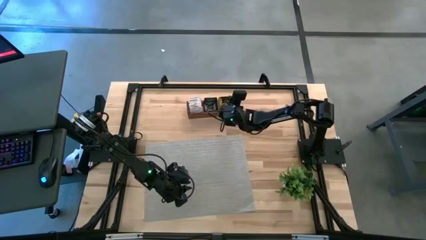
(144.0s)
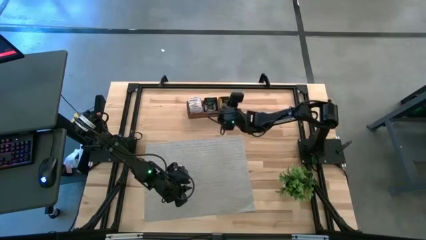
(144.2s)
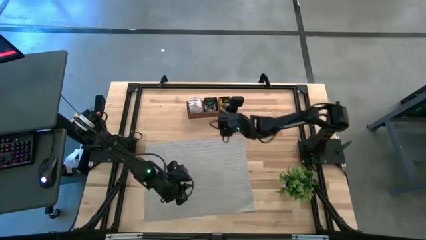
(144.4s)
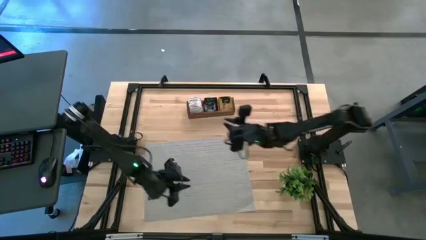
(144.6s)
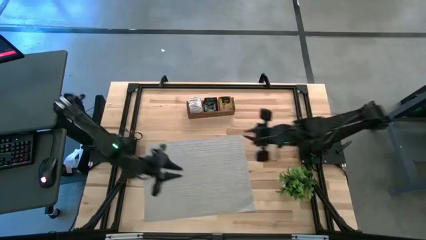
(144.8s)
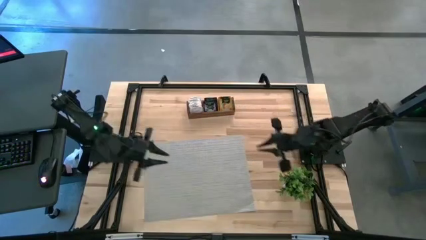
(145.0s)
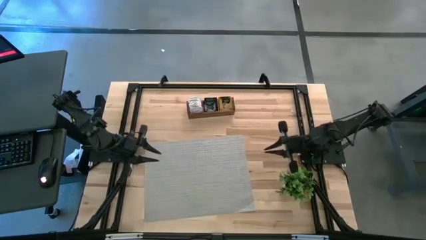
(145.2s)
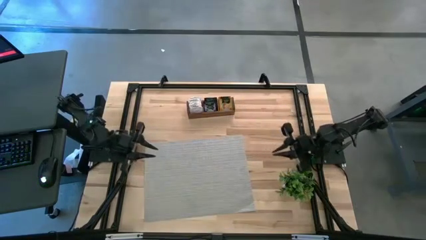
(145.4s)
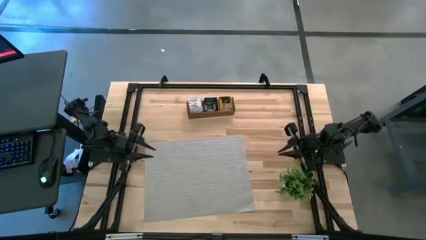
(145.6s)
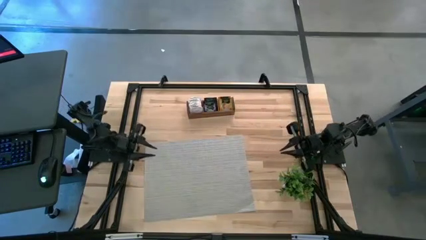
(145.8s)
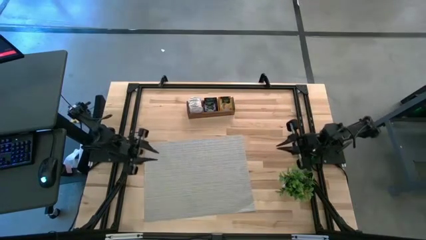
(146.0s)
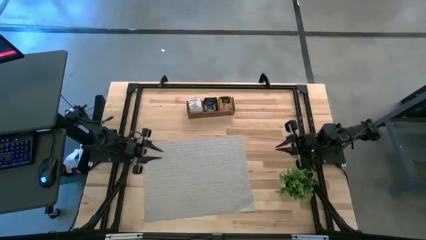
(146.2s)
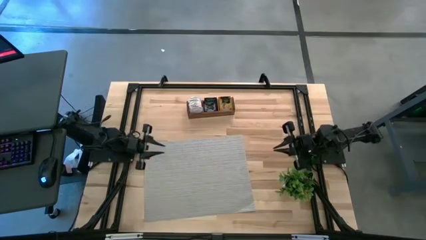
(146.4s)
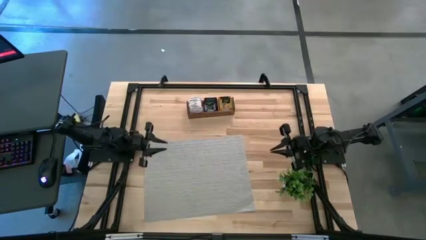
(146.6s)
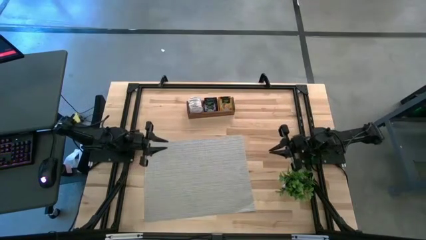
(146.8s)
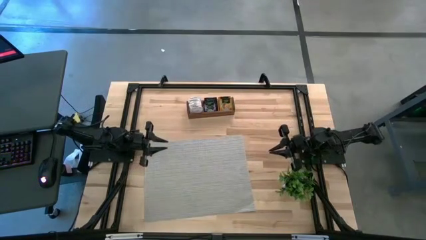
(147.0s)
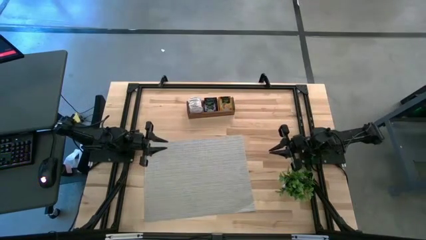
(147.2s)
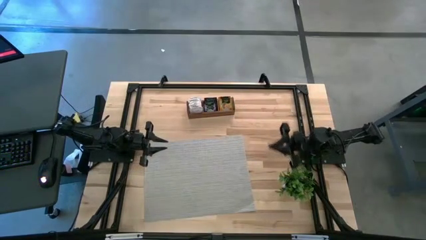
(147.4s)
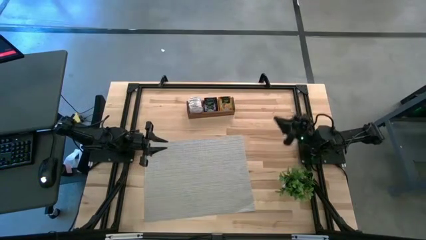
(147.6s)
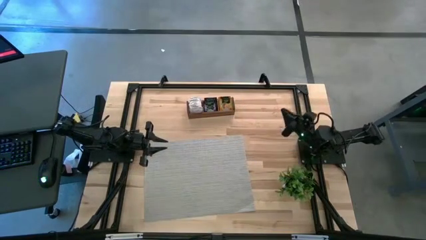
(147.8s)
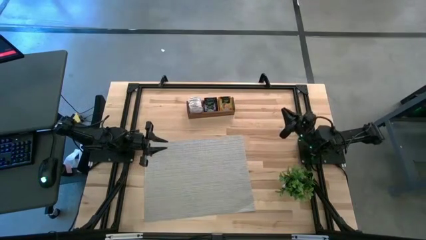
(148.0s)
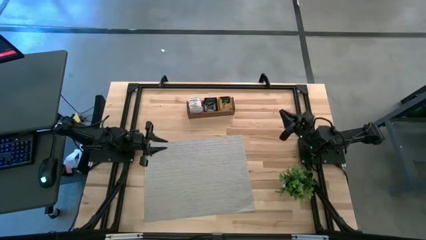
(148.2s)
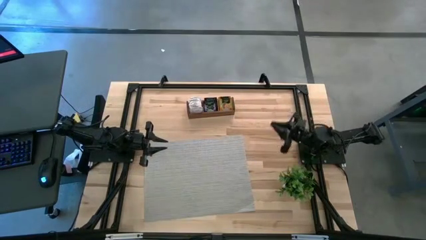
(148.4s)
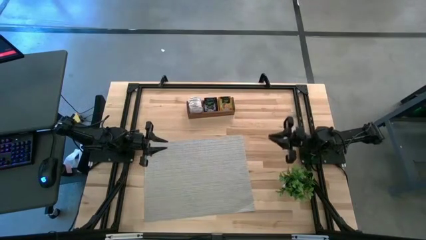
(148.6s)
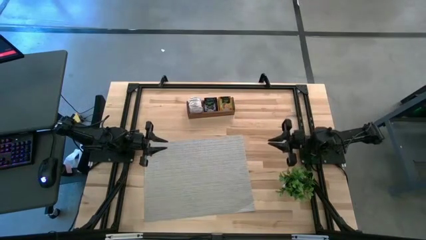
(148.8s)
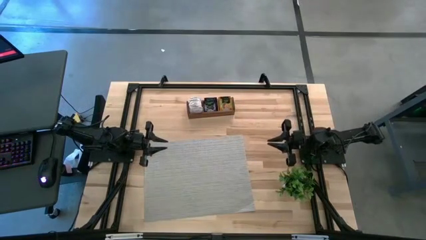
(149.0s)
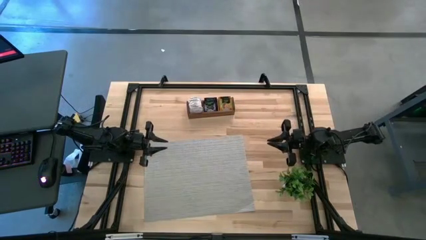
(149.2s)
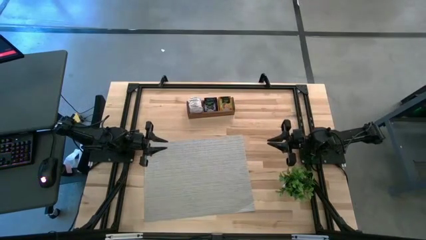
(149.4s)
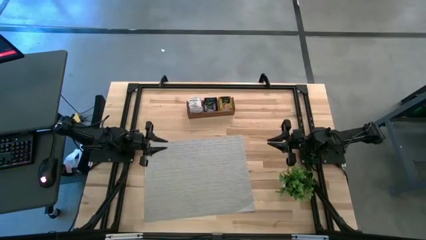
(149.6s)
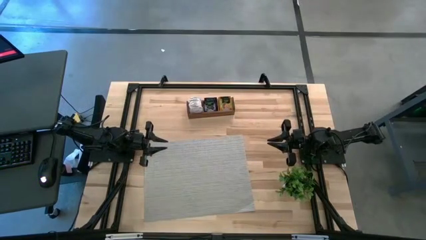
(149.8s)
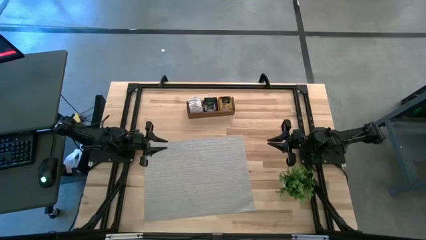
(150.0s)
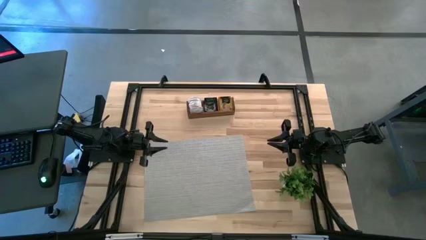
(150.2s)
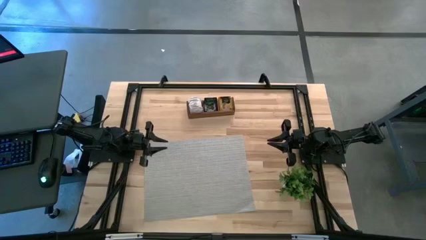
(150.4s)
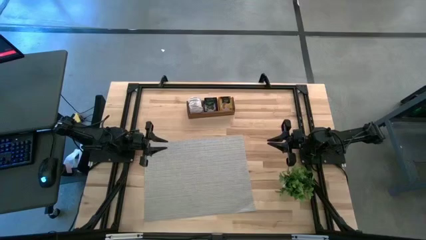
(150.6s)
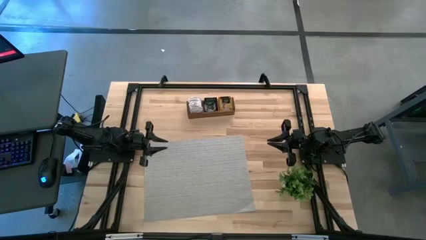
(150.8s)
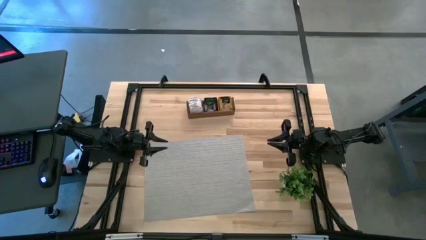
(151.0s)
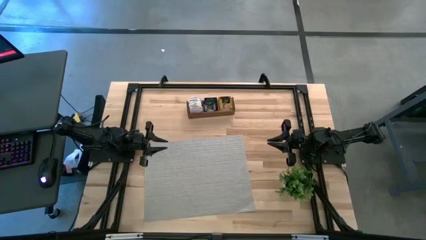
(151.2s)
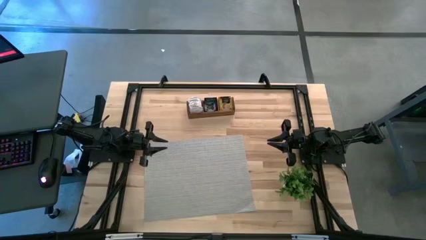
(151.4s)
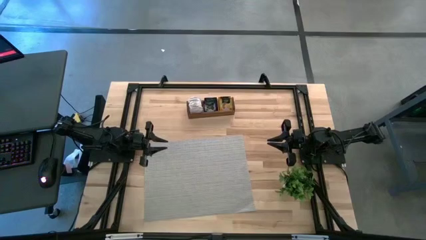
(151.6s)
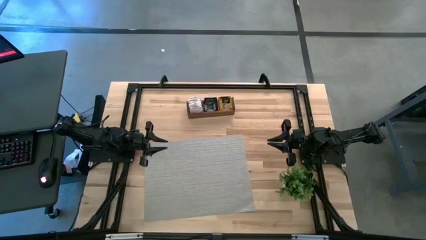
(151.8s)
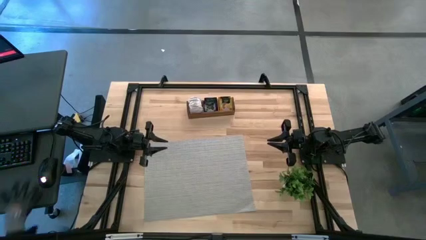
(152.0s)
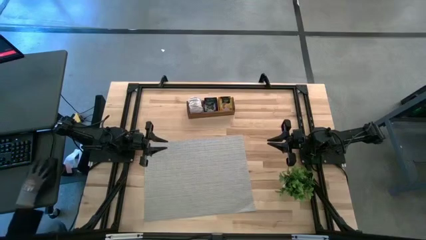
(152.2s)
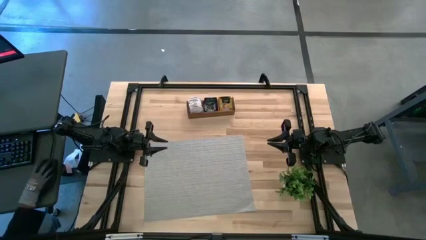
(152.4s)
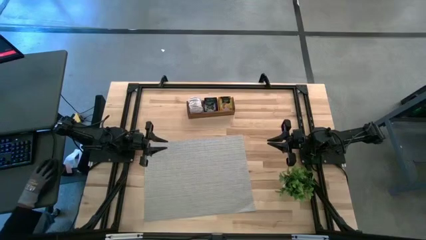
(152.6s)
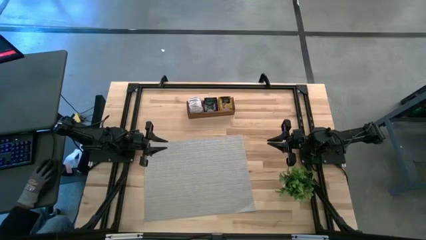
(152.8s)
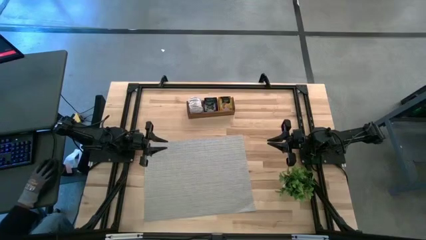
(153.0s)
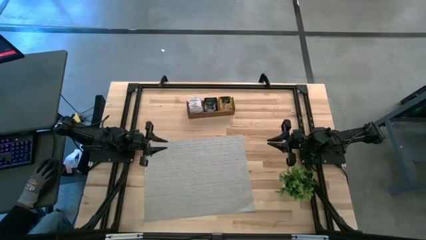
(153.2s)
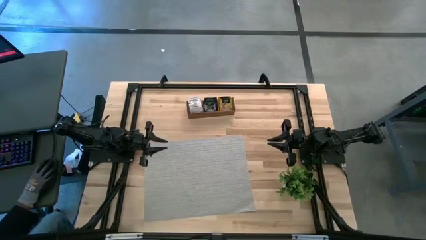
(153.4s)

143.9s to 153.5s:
Task: Pick & Place Tea
Return to Home Position

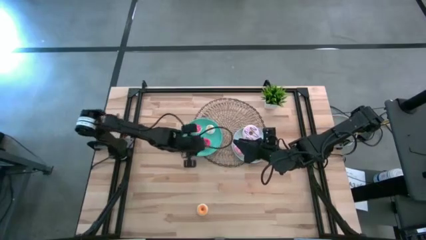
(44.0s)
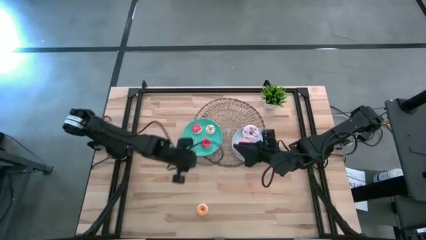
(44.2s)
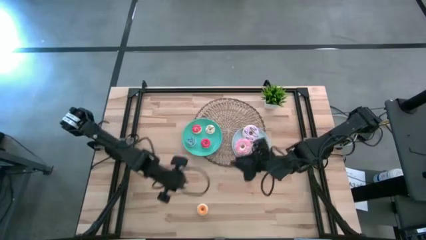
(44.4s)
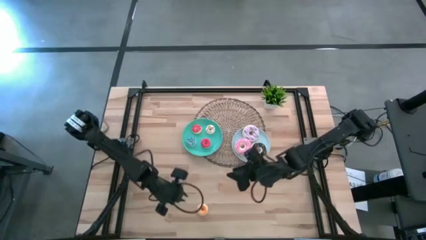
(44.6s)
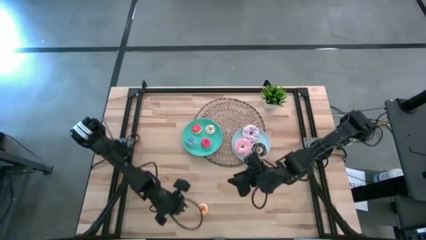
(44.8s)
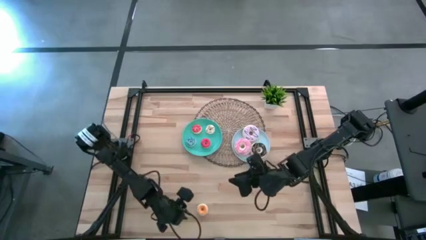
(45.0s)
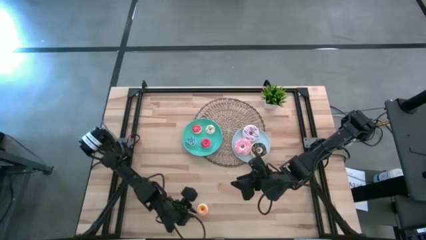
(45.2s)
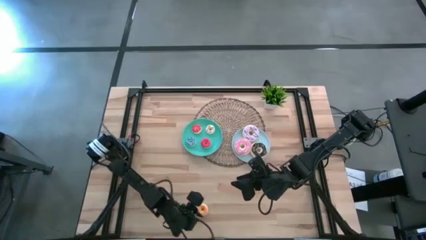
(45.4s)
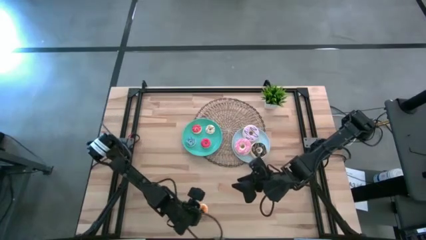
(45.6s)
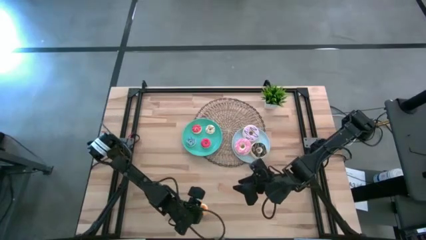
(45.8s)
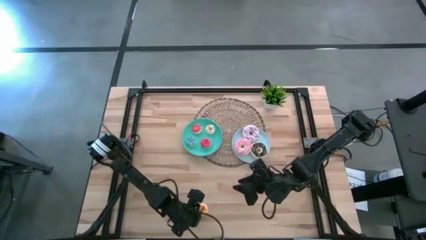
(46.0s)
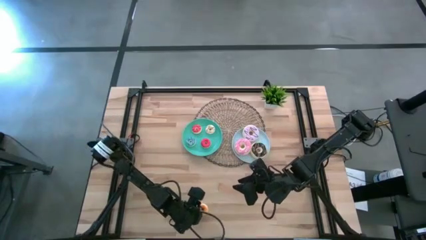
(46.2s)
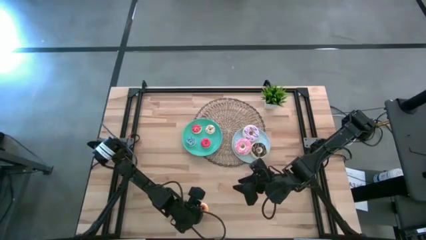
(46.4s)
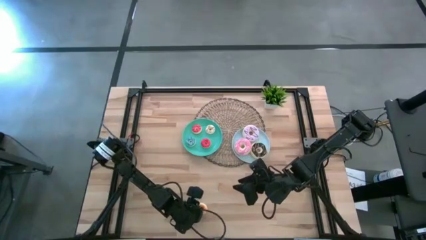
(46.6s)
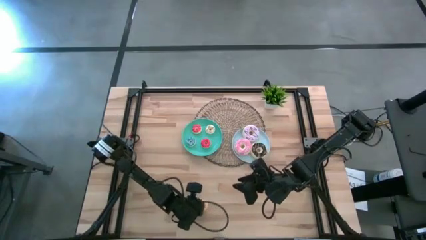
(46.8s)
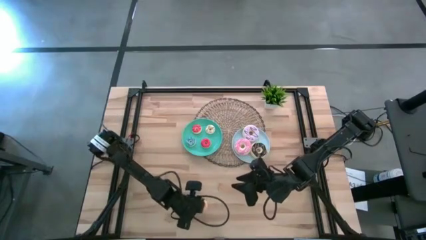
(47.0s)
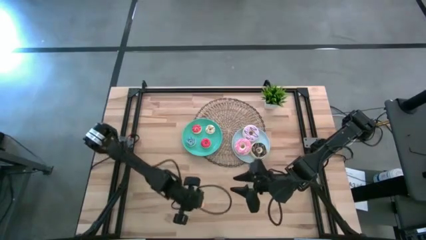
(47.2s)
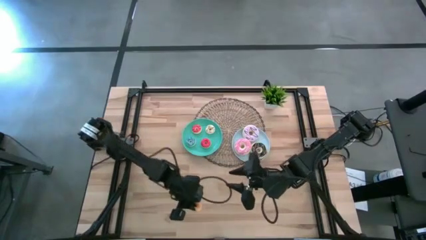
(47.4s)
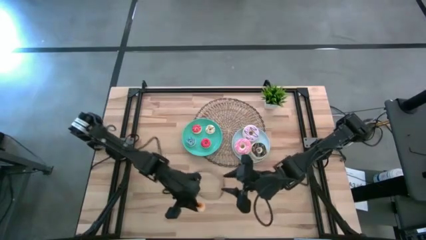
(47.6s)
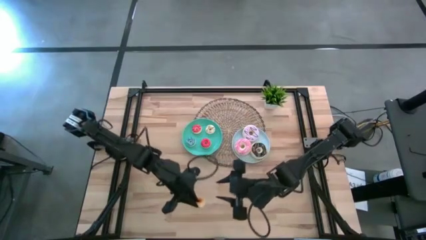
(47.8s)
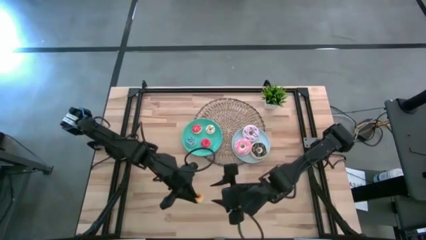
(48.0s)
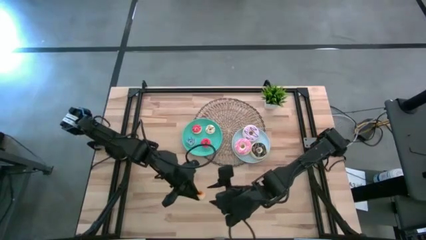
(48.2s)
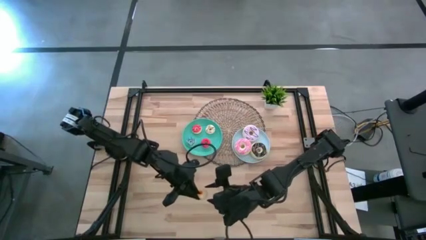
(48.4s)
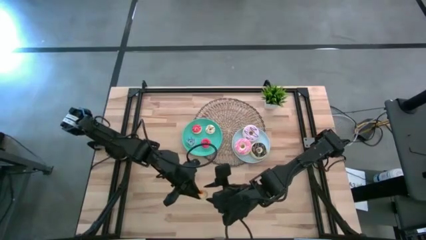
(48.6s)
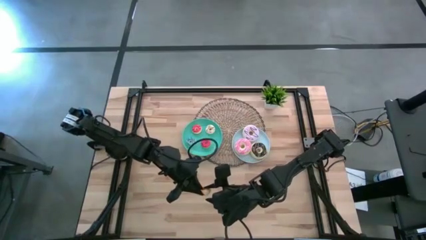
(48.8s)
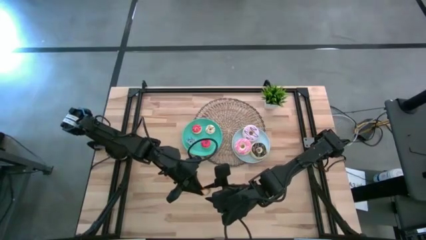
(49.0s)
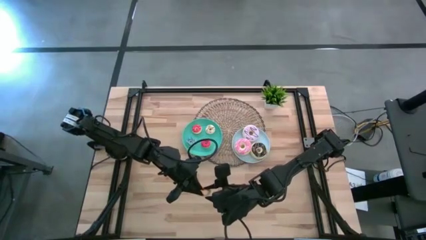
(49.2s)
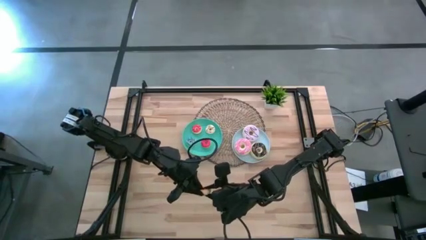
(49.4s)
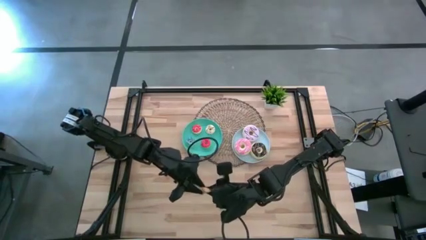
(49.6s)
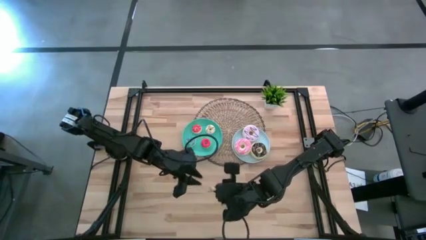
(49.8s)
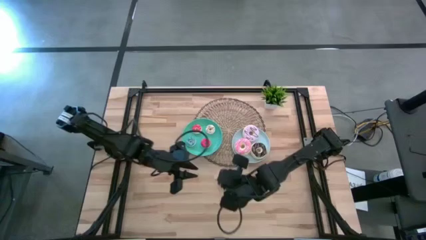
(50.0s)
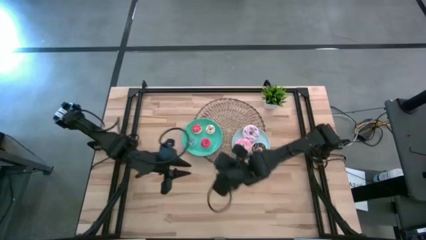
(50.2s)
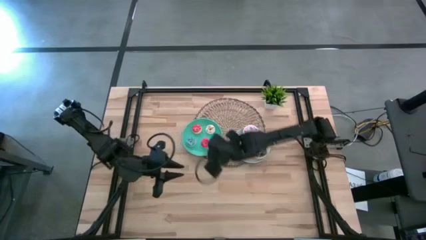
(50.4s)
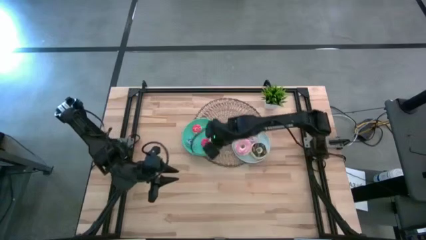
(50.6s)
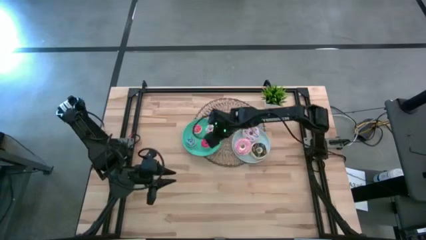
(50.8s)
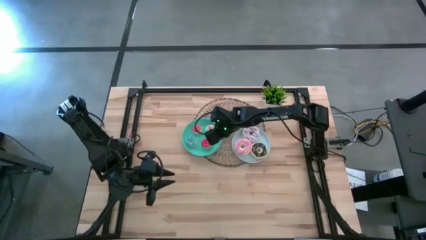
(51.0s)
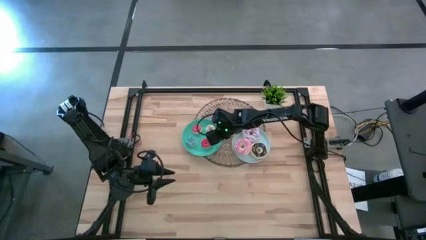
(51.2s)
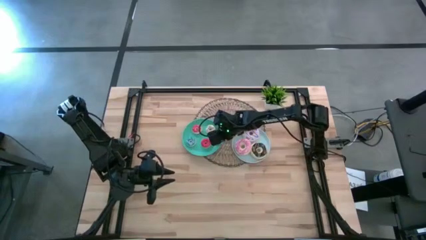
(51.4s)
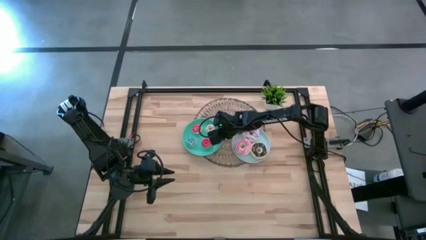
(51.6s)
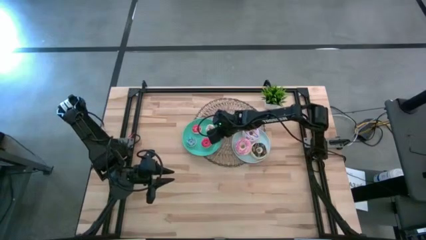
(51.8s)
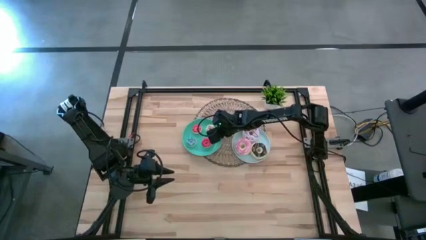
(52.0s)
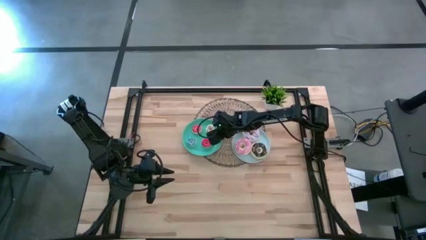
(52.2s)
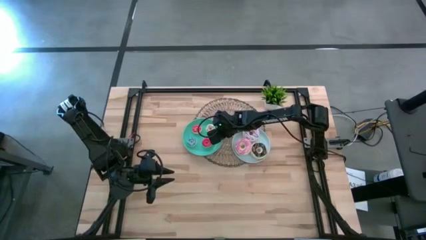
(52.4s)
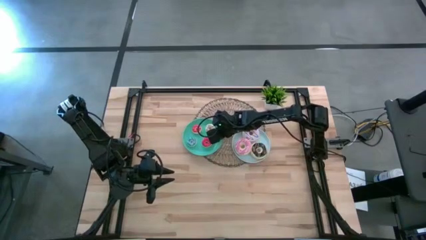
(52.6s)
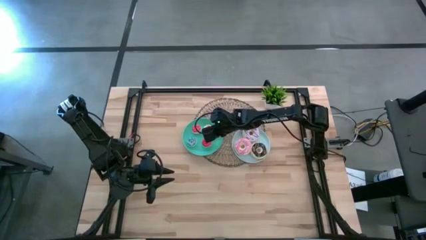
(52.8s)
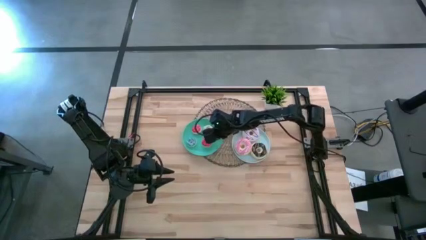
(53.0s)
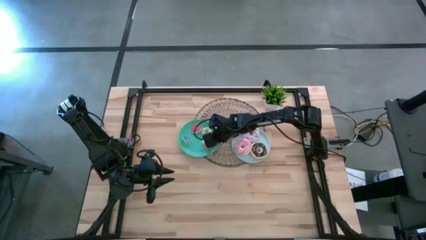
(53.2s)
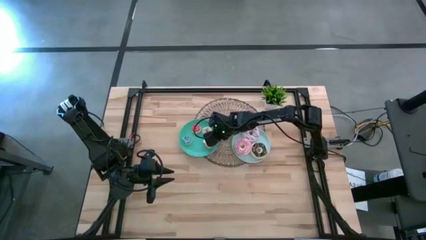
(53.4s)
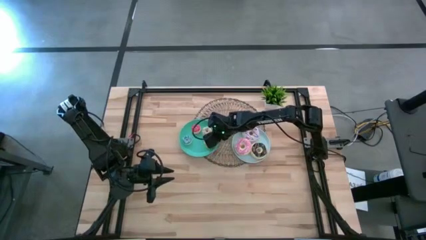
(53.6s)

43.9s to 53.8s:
Task: Pick & Place donuts
Put the small yellow donut on the green plate
